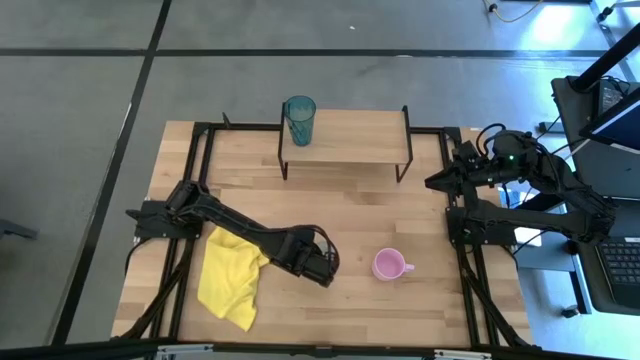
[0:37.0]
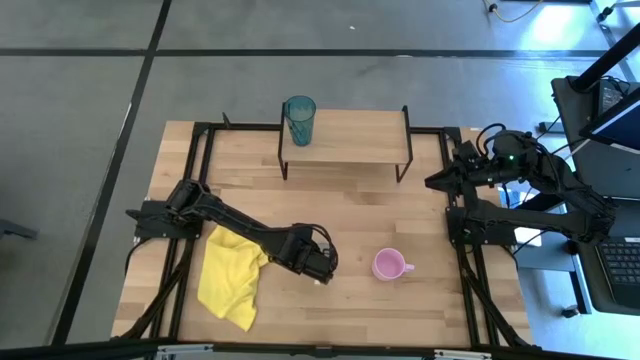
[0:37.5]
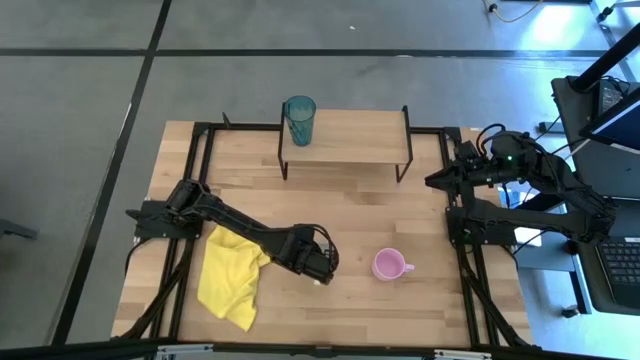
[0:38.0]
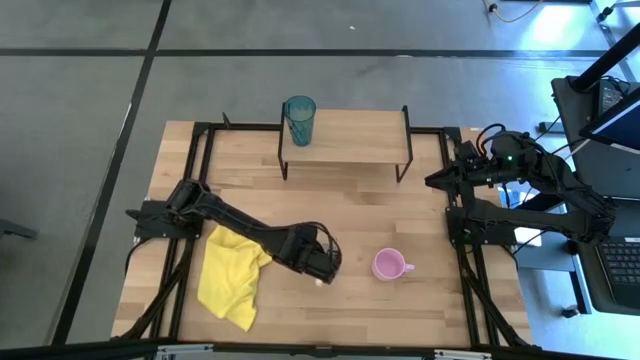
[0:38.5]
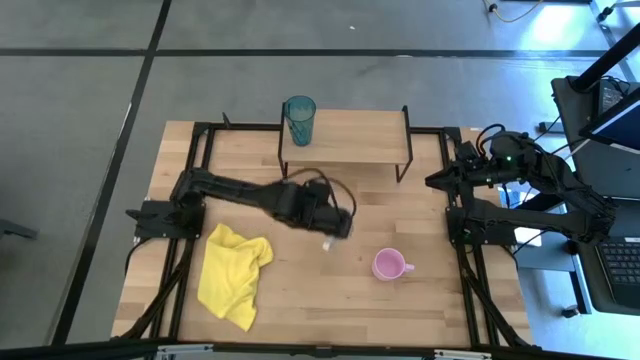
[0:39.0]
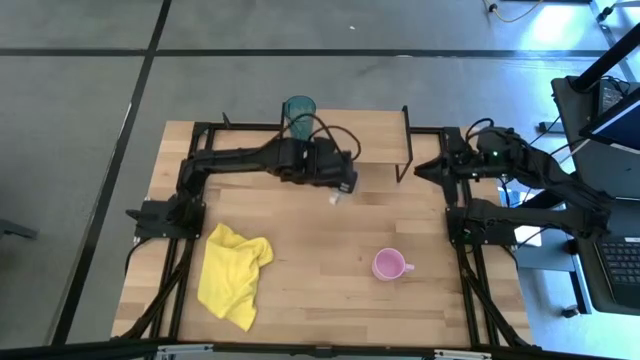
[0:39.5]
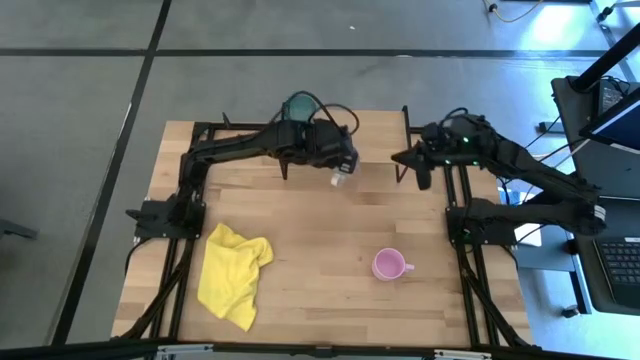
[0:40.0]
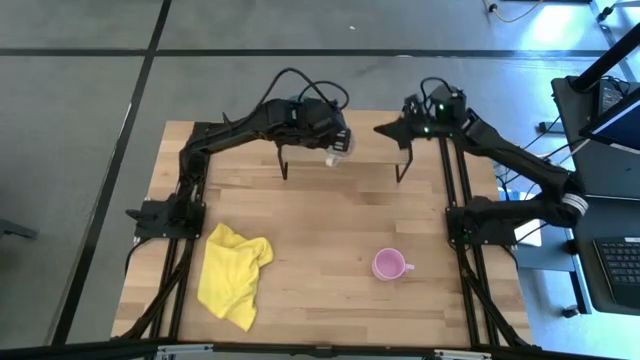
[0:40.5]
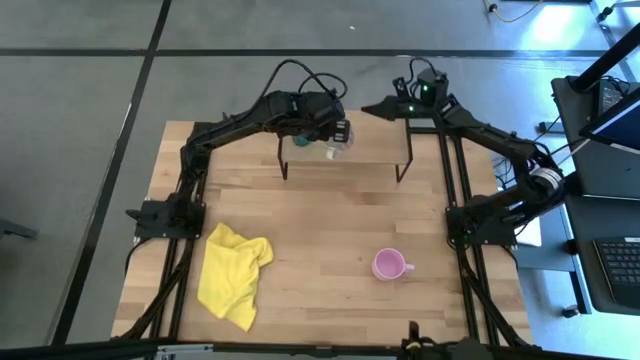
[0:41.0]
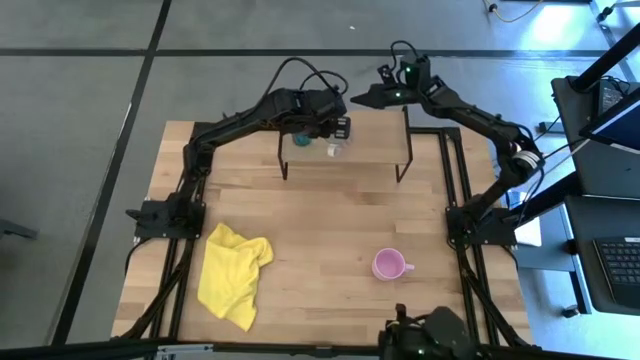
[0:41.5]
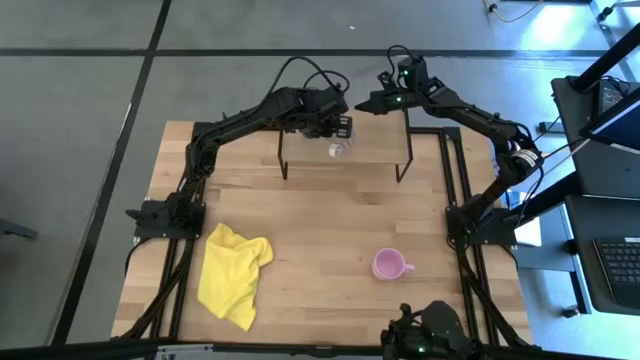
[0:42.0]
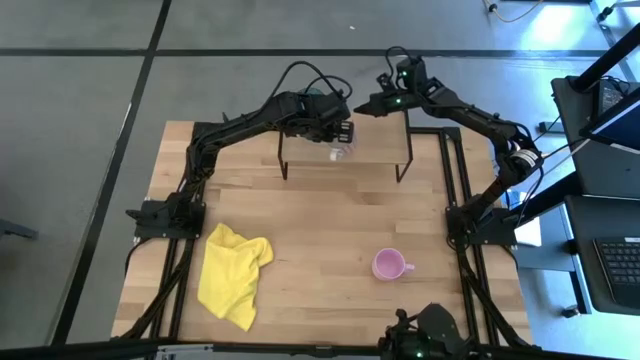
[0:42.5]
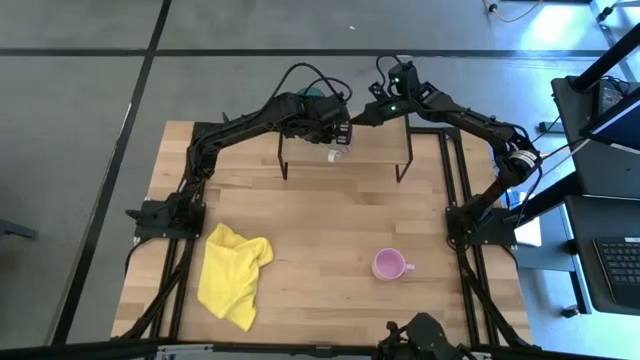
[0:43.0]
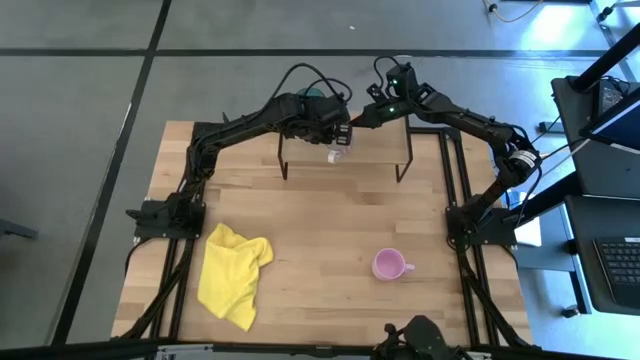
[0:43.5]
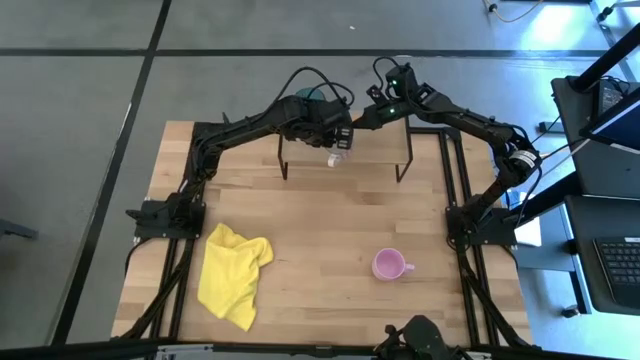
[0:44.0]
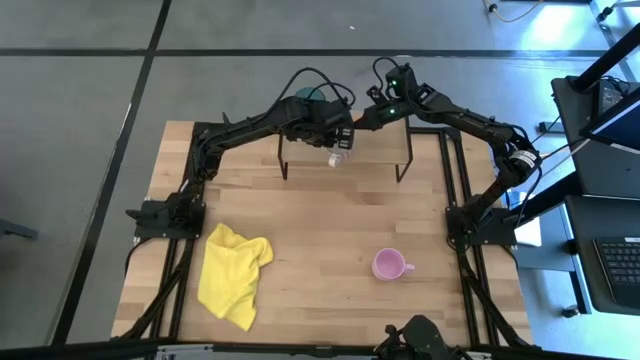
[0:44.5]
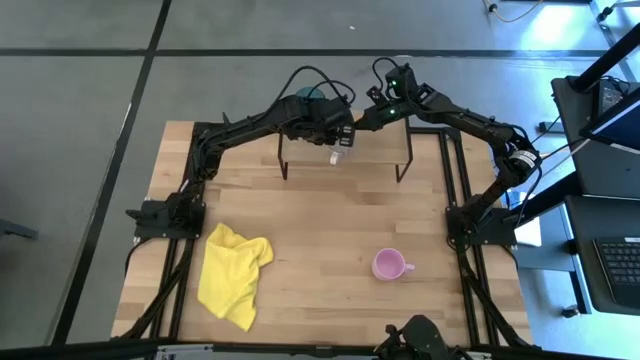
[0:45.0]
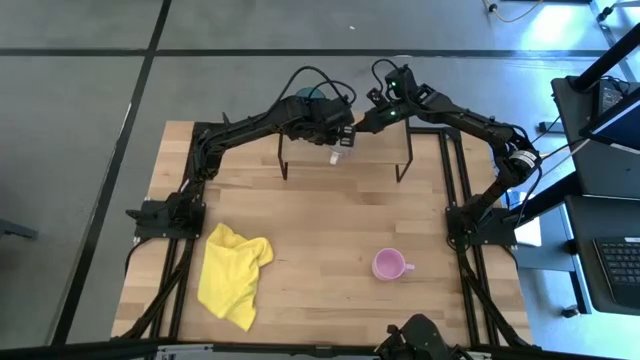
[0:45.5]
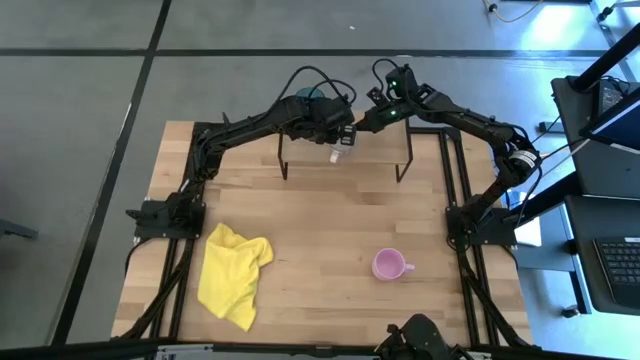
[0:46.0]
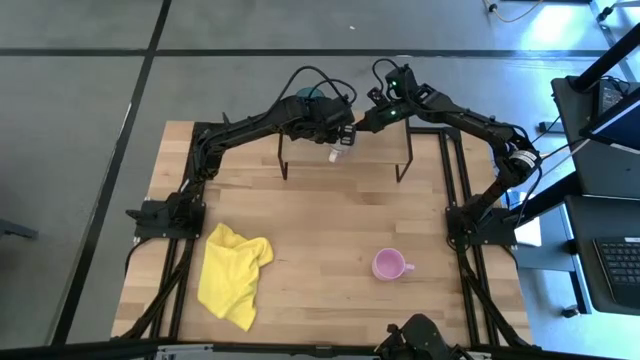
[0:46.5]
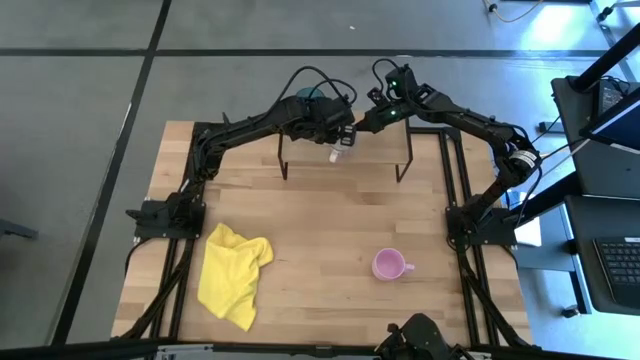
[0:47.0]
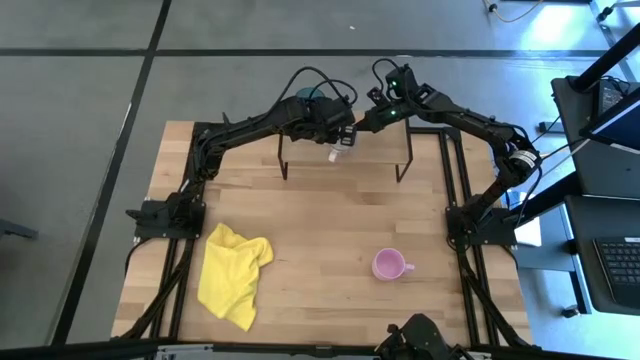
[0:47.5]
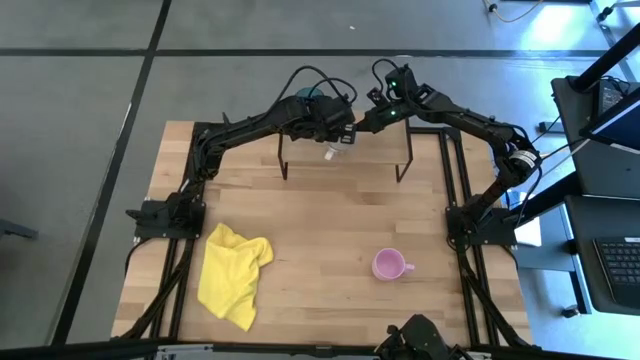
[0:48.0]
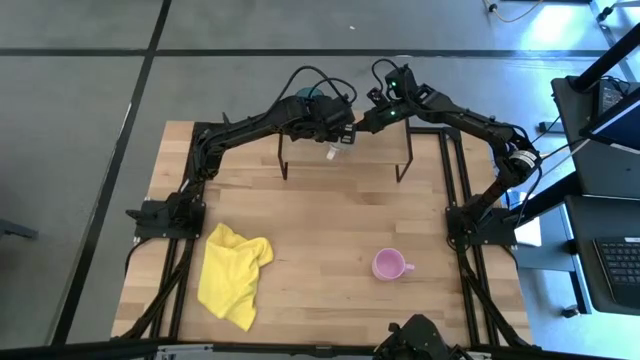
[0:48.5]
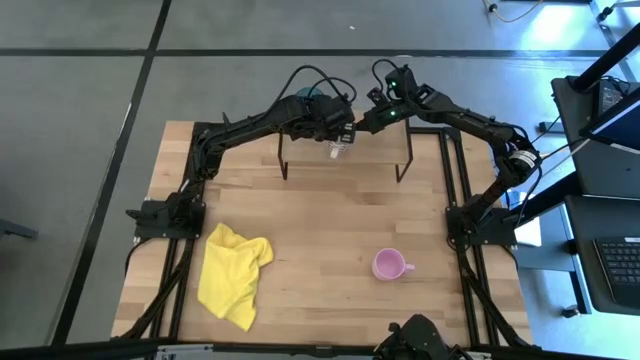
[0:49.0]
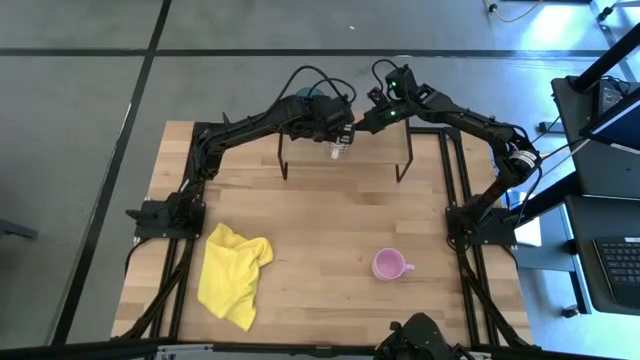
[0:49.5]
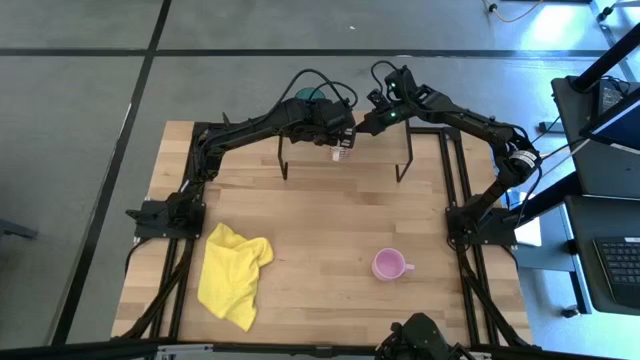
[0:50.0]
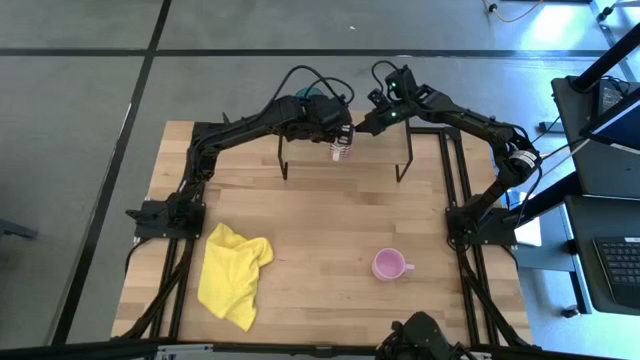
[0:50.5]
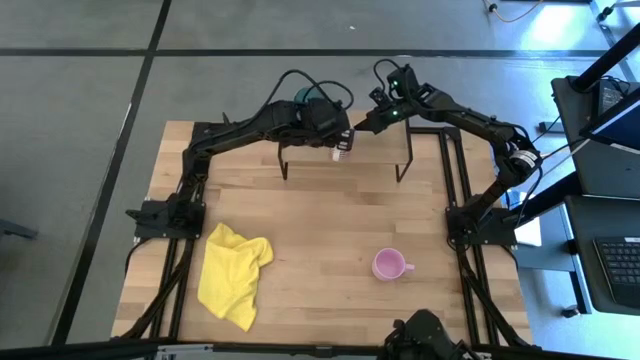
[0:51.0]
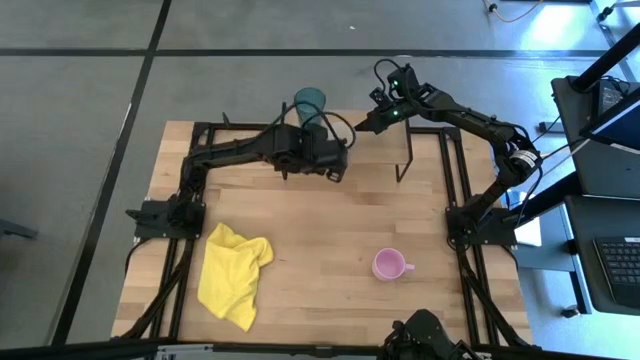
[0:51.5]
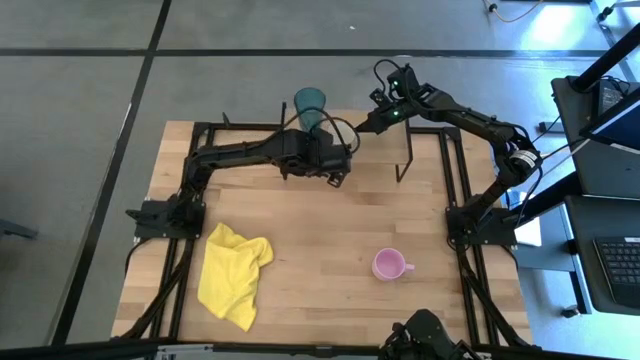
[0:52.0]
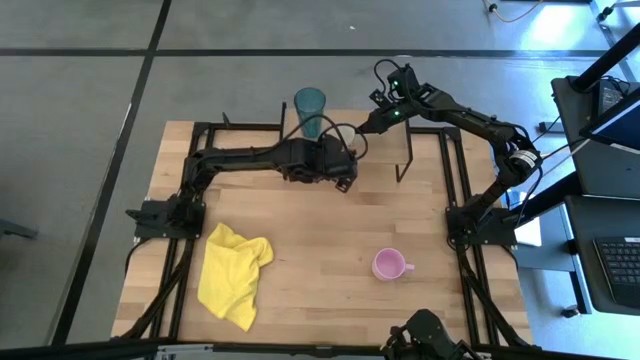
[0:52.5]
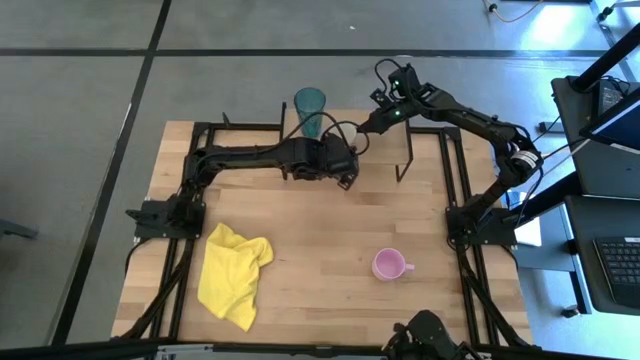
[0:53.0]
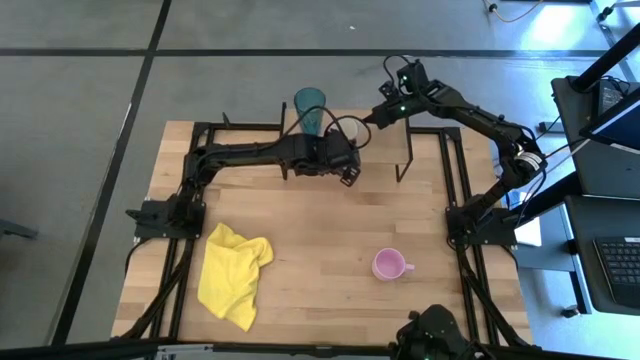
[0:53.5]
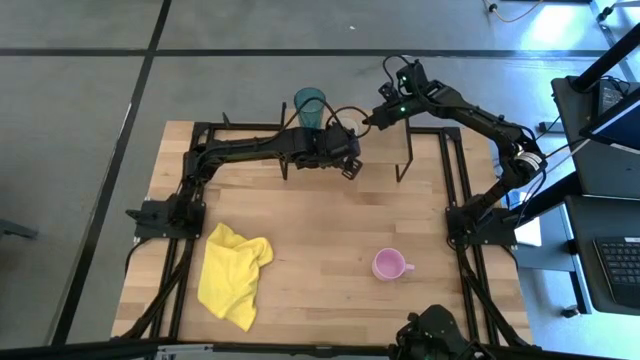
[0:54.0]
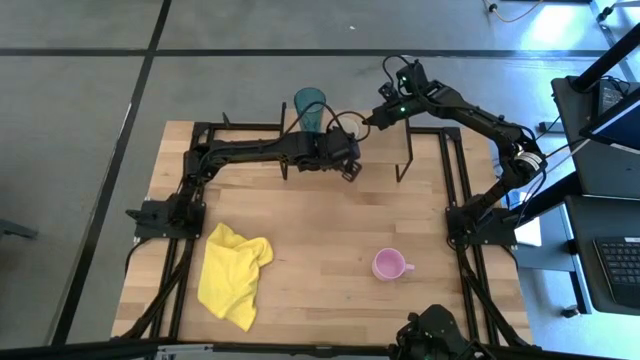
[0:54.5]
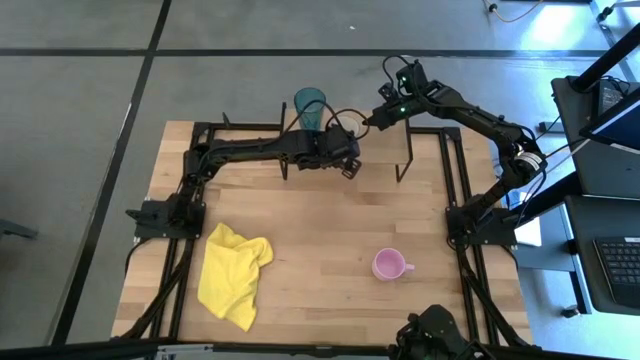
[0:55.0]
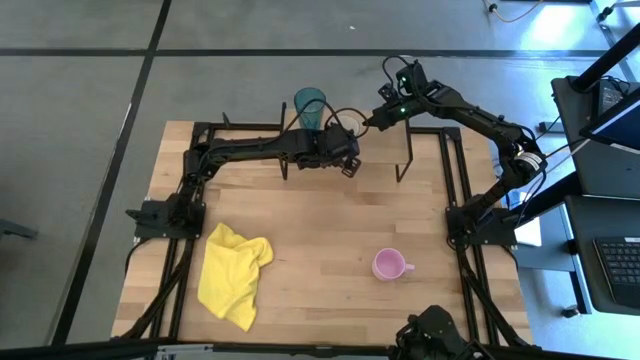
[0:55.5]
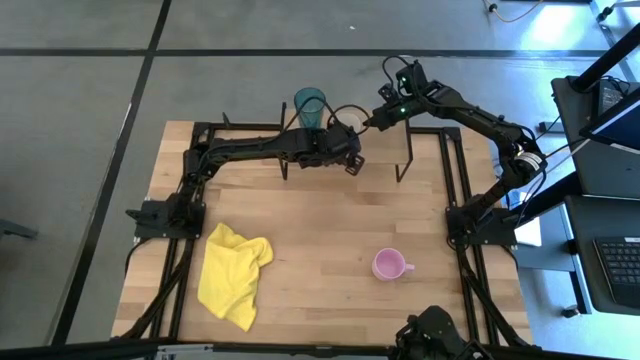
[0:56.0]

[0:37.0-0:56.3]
Task: Stack small to large cups/mugs on shelf
Put the red cup on the shelf
